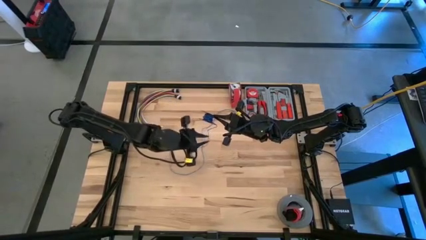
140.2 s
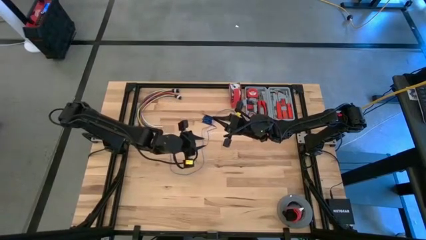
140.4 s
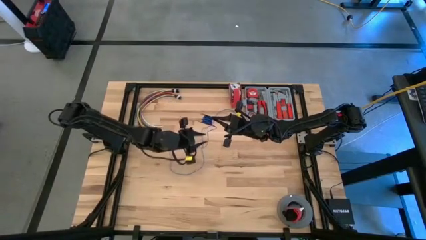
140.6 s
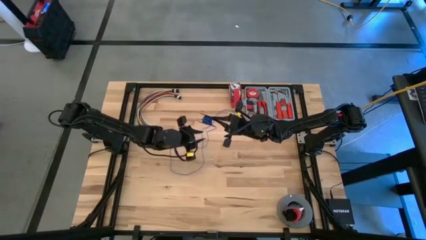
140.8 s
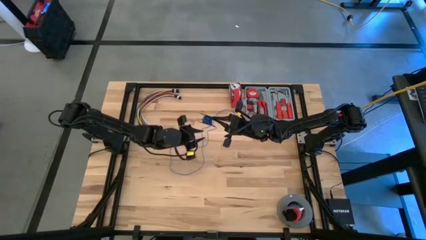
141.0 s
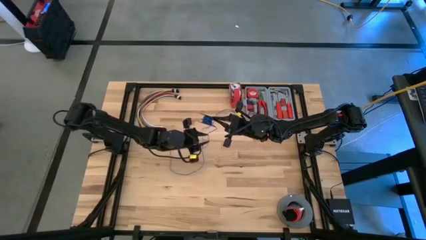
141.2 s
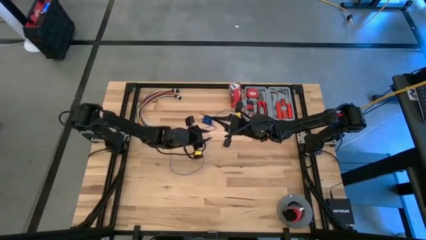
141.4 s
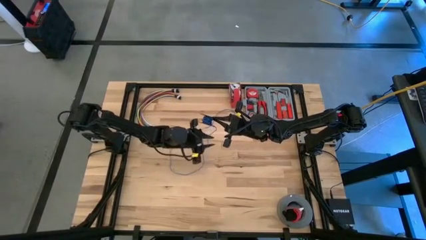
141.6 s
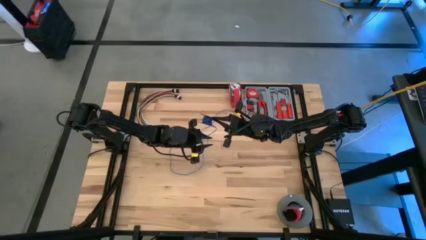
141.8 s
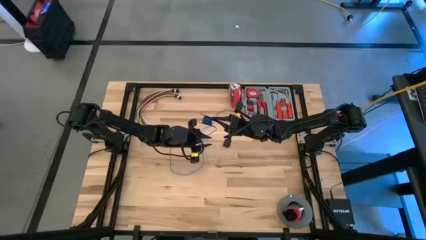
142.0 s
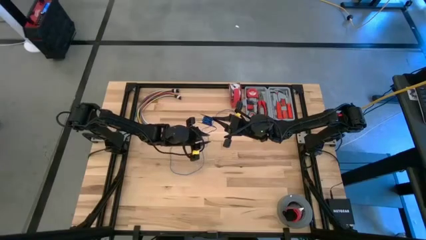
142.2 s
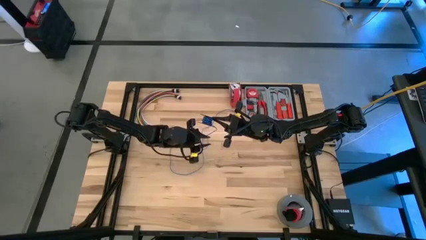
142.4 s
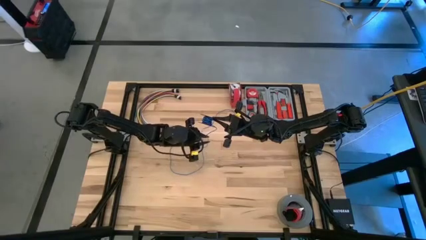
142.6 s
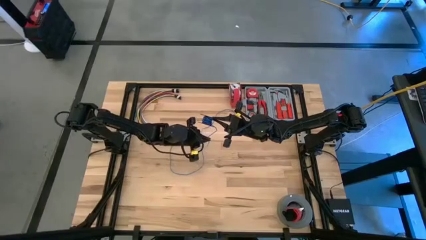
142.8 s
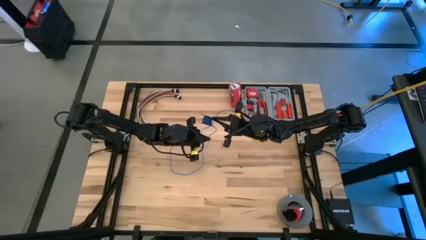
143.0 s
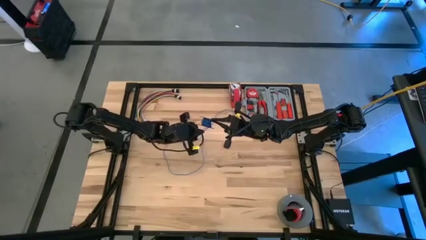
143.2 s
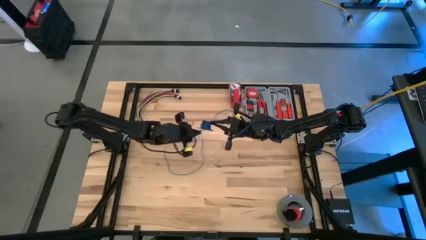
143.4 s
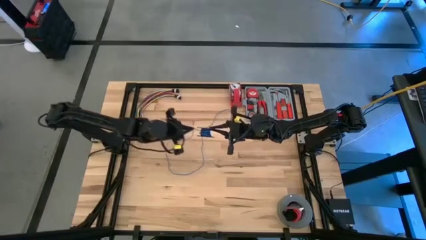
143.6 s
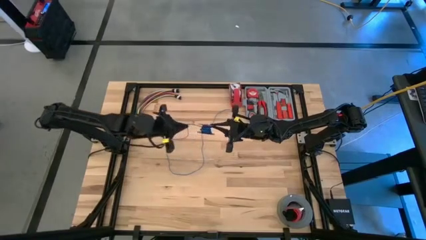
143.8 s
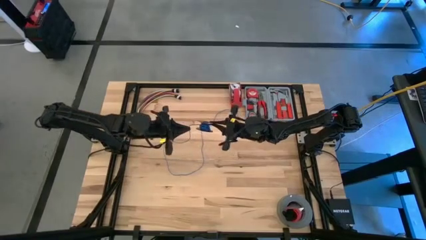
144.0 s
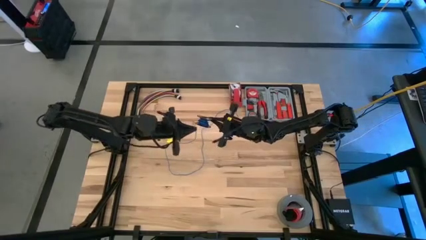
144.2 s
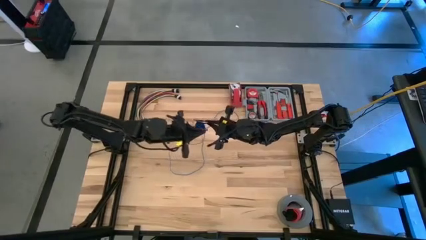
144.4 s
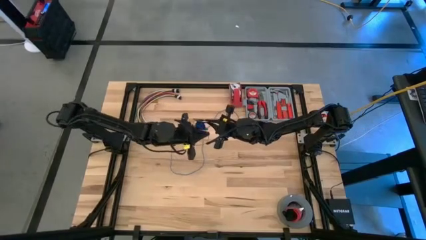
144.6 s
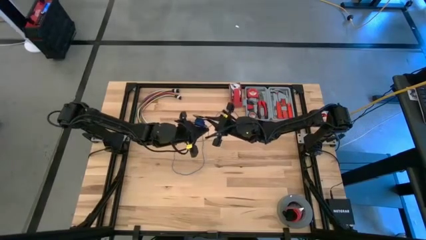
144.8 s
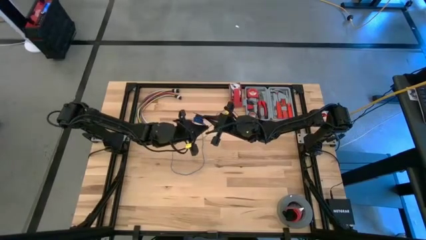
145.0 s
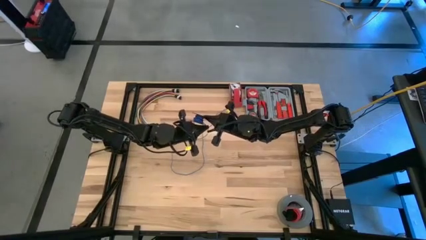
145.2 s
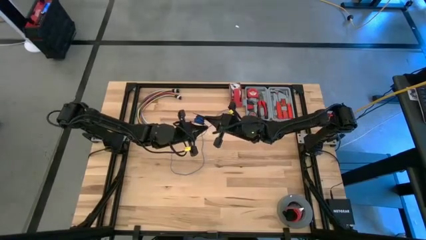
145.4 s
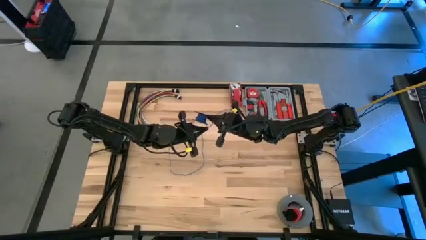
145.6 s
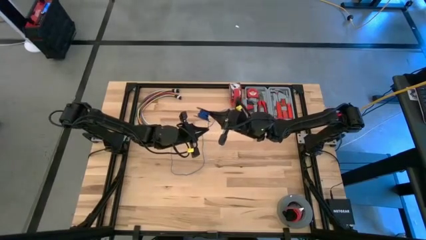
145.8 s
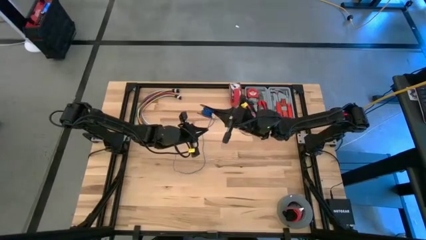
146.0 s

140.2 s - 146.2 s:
Task: Coil cords
Coil the blue wire on the black spool

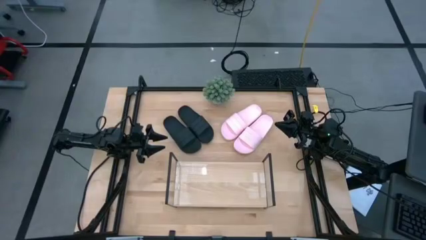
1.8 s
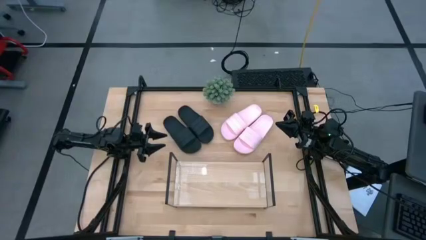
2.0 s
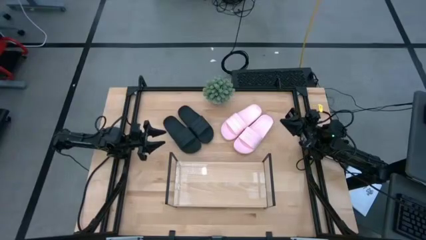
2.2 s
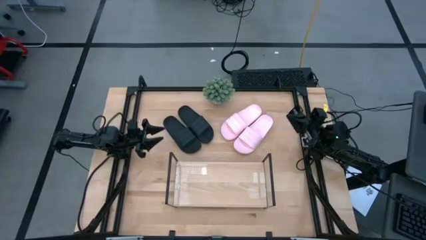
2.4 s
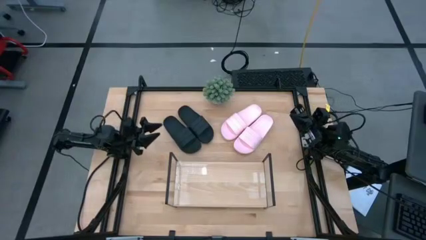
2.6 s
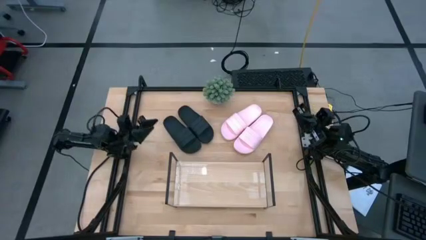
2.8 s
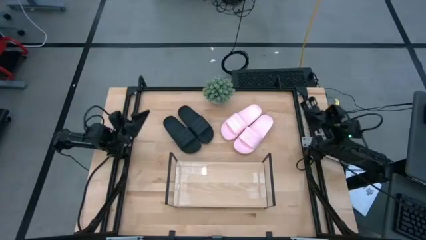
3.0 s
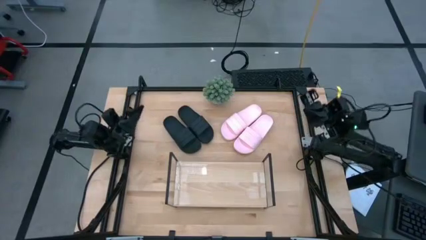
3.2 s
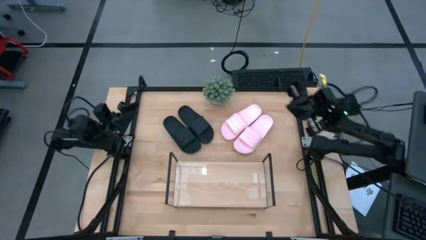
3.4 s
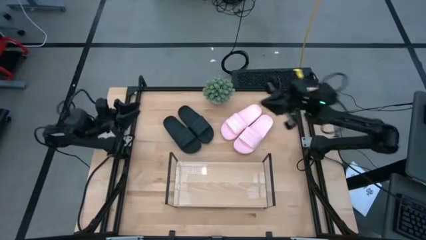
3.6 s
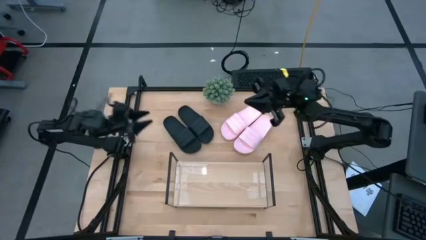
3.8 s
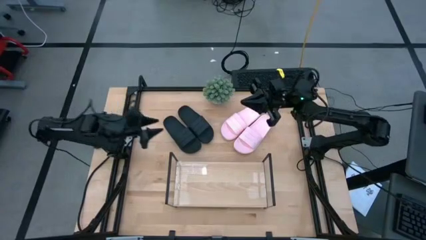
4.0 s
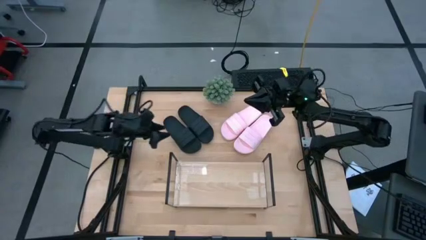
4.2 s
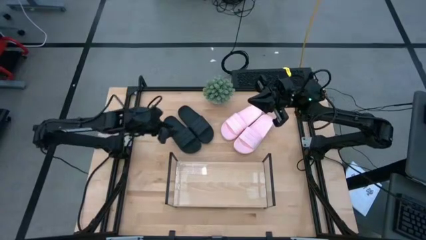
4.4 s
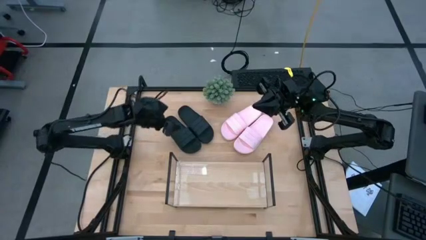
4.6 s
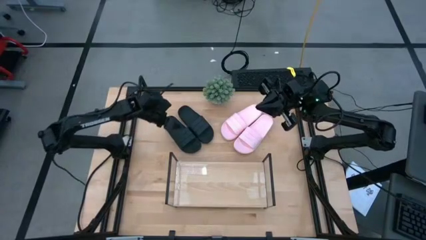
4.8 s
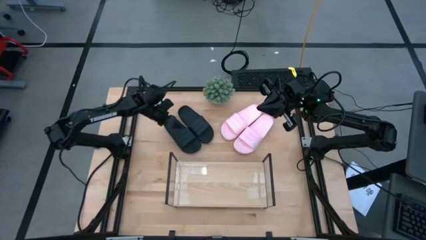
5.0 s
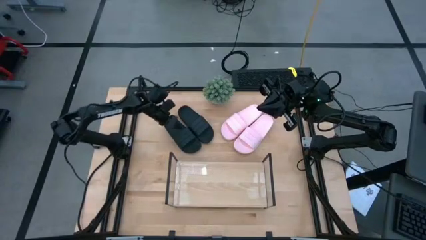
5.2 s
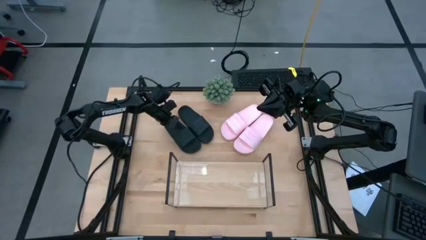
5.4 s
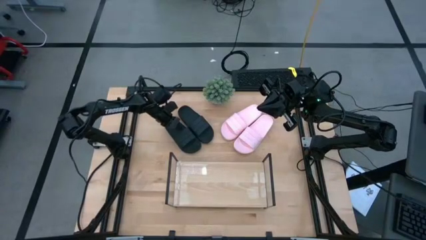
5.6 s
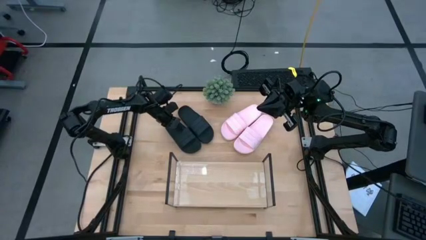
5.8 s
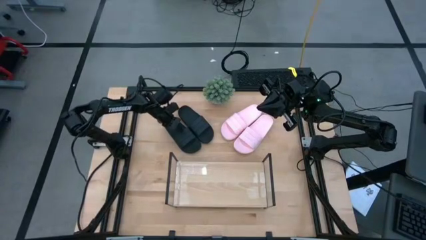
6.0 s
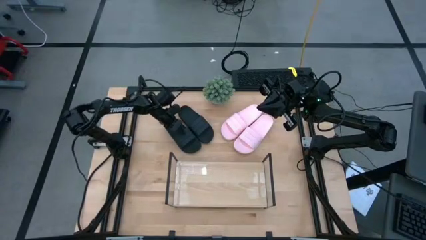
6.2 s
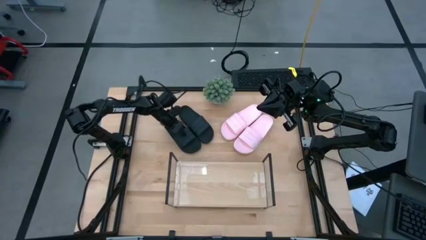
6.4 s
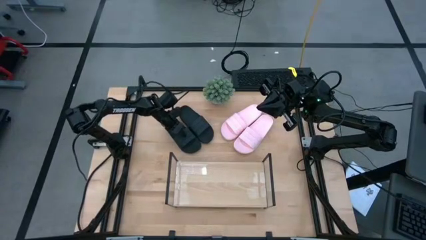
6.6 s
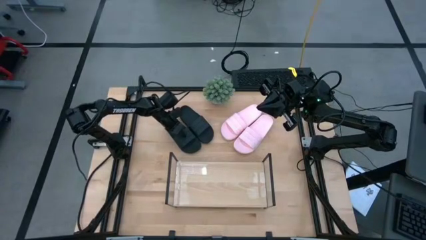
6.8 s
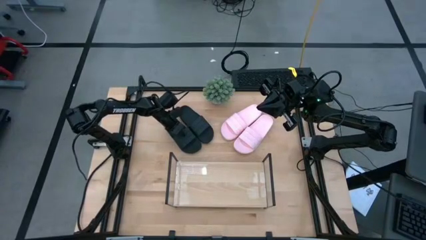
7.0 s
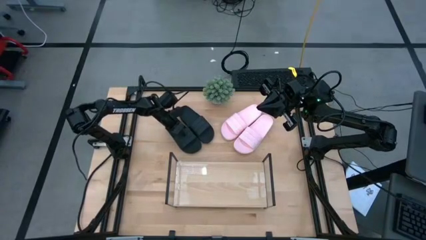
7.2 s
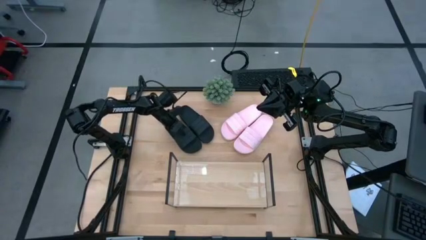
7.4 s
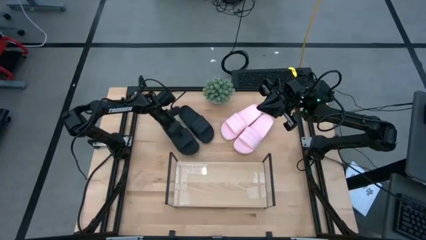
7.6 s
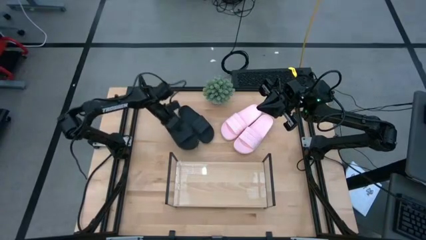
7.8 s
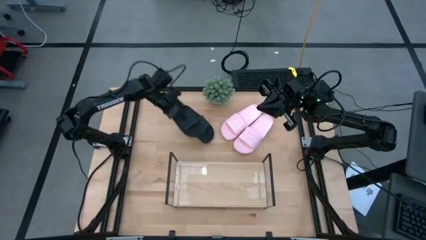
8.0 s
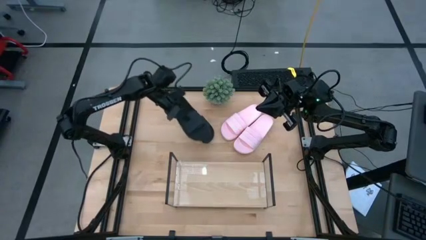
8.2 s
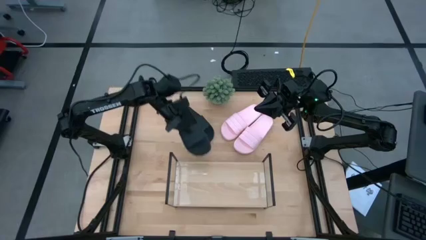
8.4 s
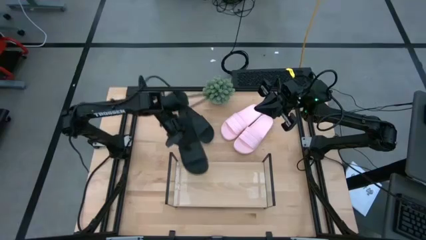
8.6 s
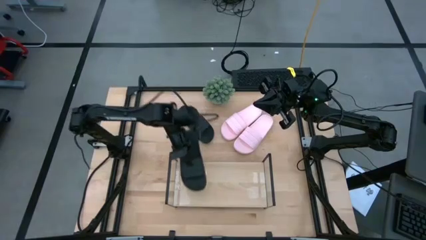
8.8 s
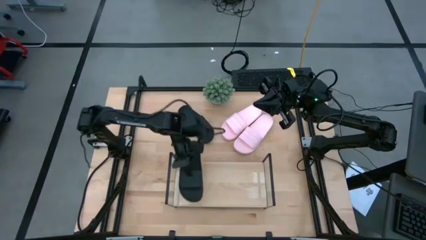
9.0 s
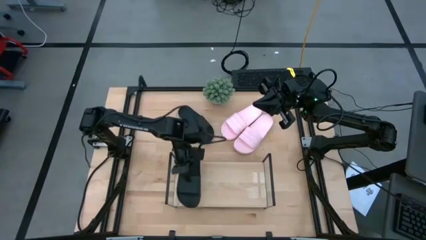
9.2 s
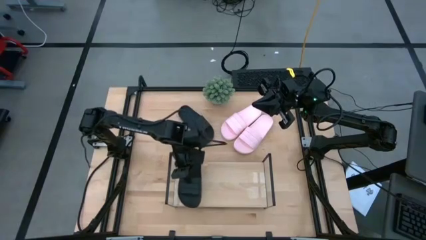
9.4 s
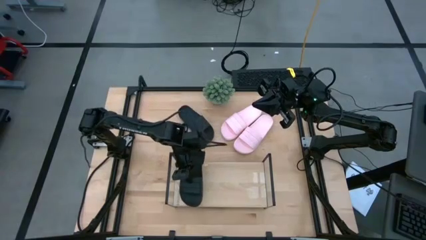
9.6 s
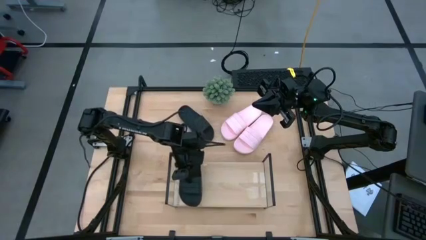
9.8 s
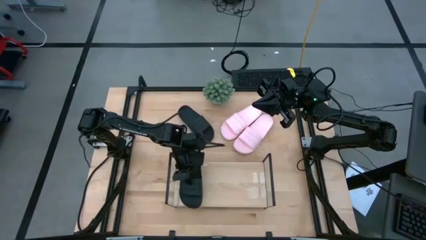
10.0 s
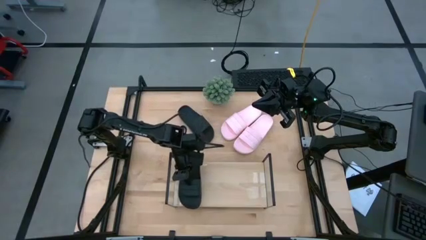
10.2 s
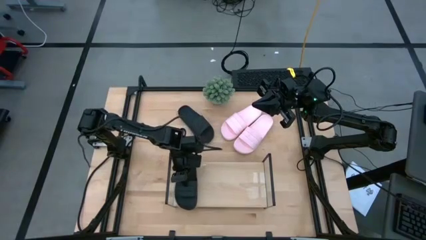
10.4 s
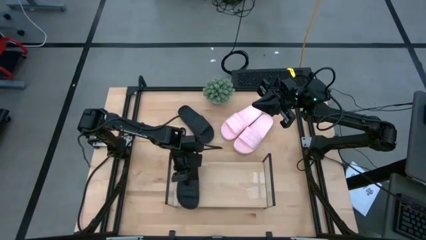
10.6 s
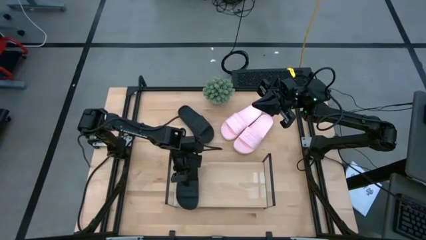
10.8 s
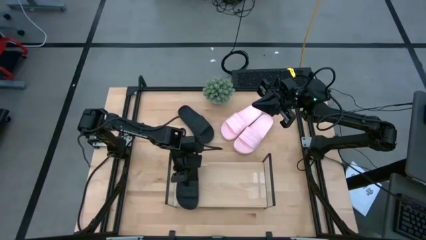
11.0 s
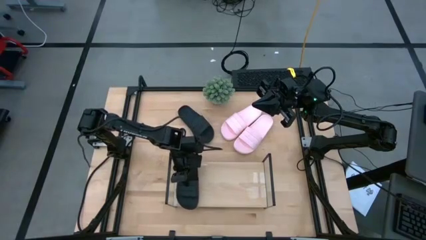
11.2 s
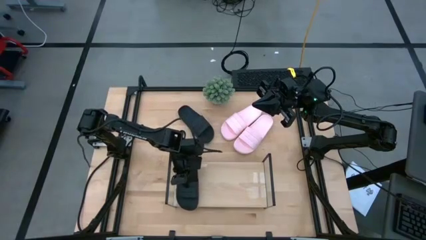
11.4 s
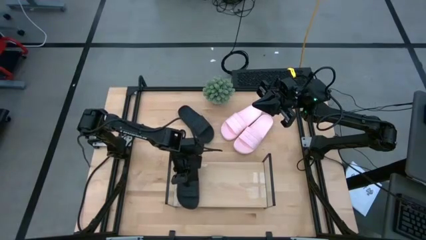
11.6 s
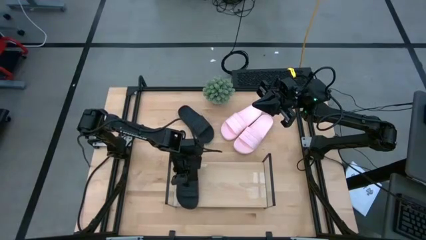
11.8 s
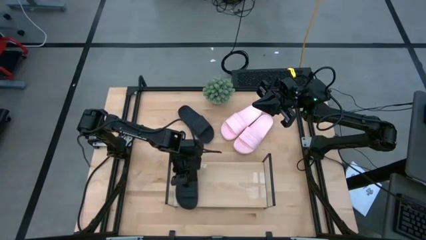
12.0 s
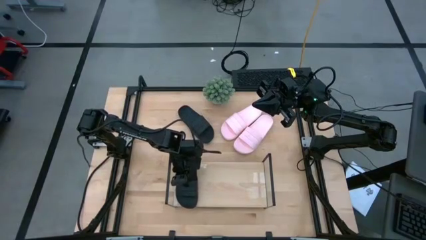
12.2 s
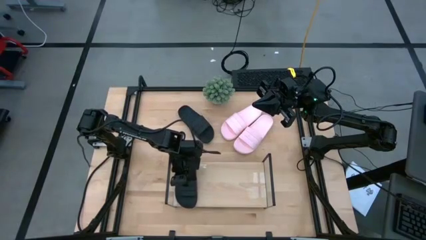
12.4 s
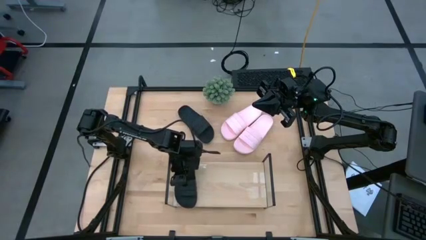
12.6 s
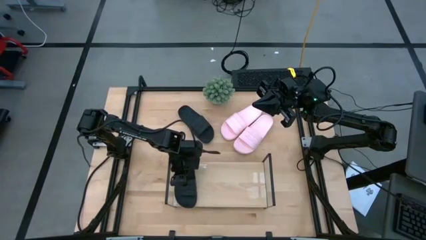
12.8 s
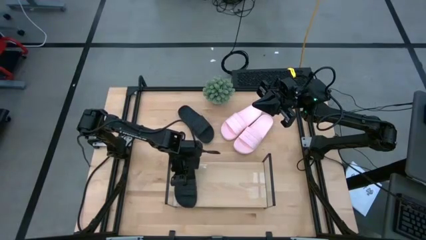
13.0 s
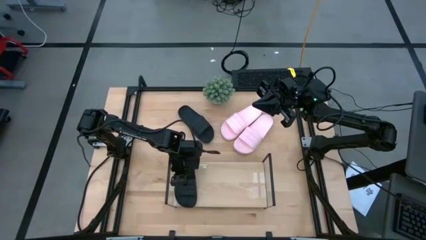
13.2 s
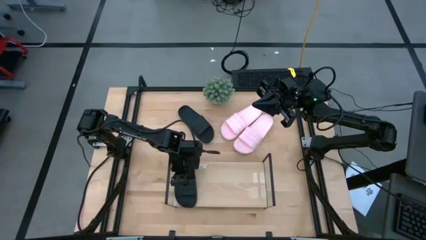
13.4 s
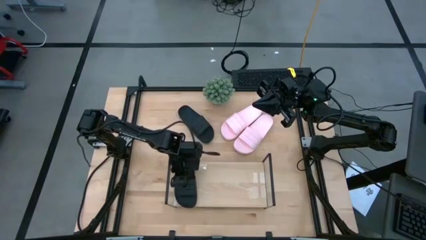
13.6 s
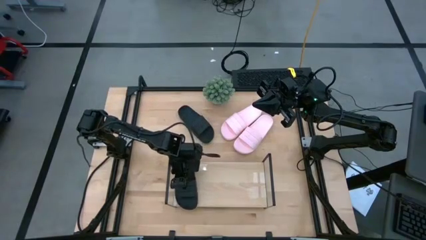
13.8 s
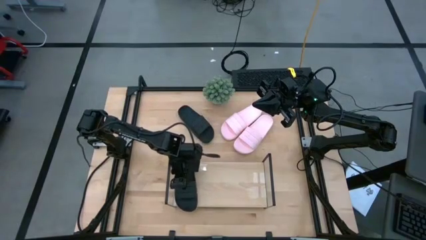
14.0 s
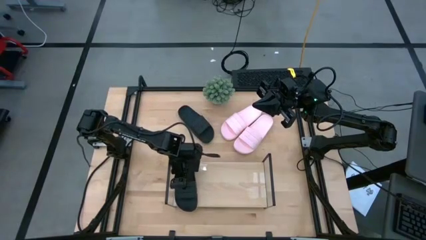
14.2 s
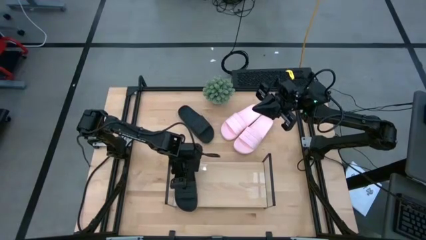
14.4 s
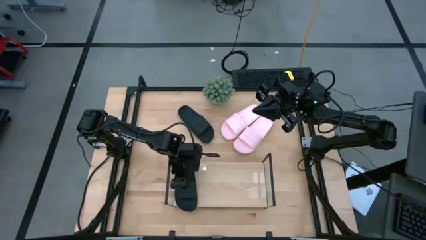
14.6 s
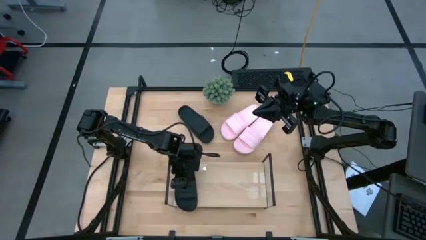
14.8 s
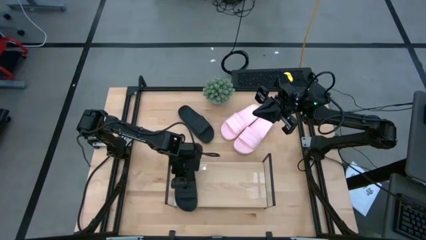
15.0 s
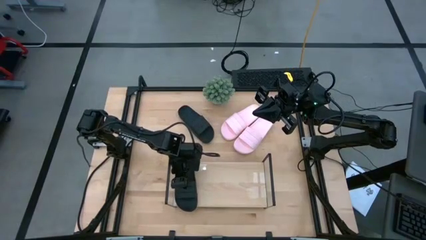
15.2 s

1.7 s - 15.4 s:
Task: Pick and place slides into the shelf
Put the left black slipper on the shelf
